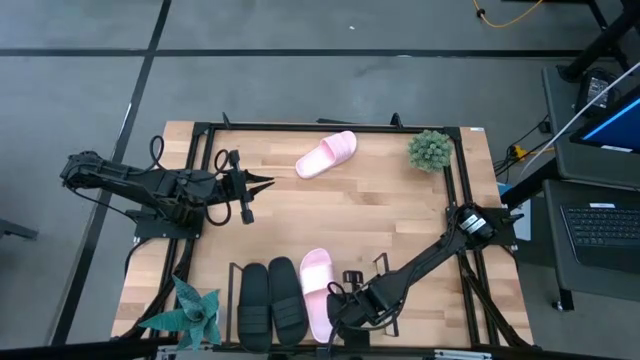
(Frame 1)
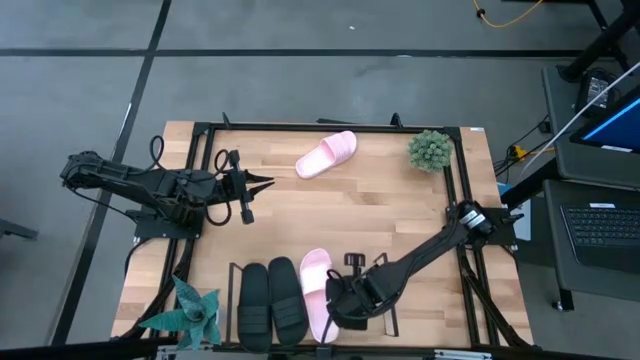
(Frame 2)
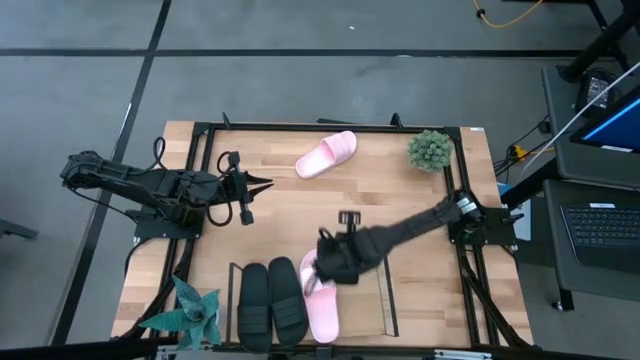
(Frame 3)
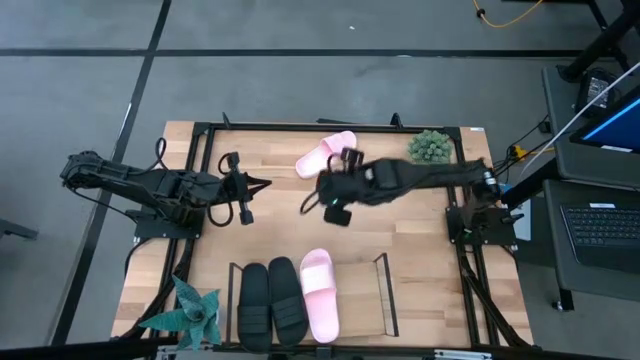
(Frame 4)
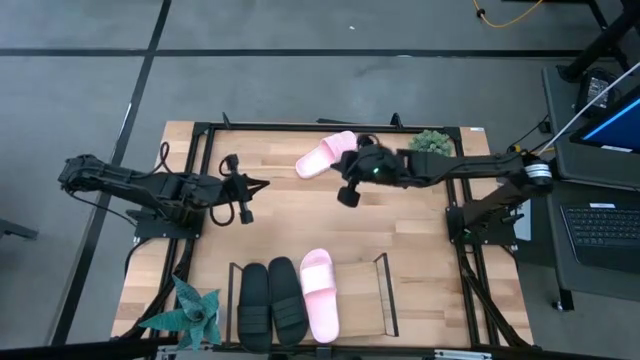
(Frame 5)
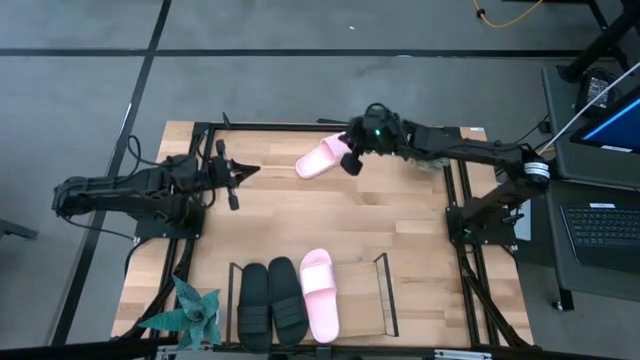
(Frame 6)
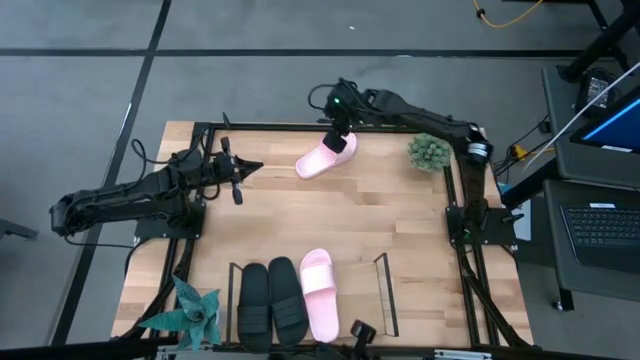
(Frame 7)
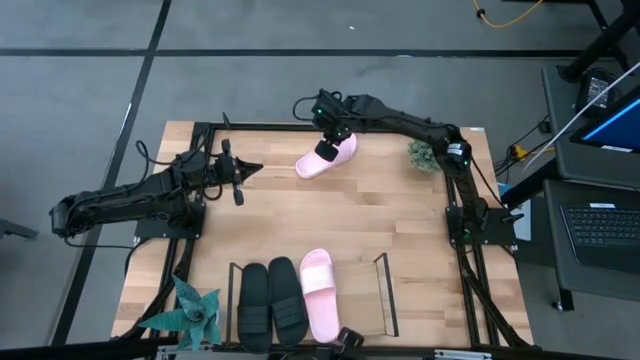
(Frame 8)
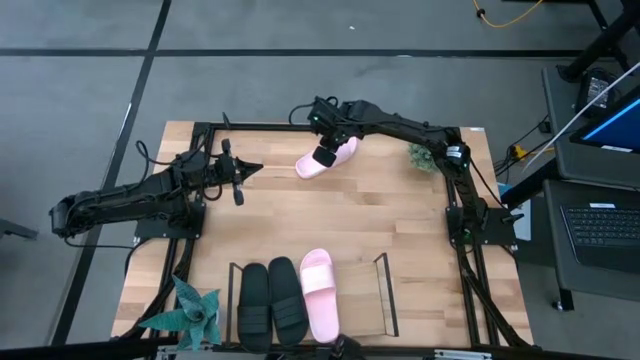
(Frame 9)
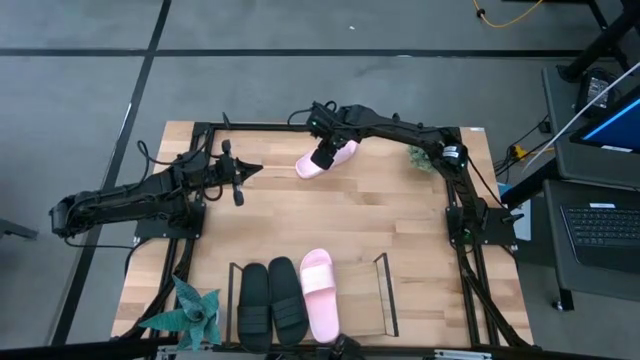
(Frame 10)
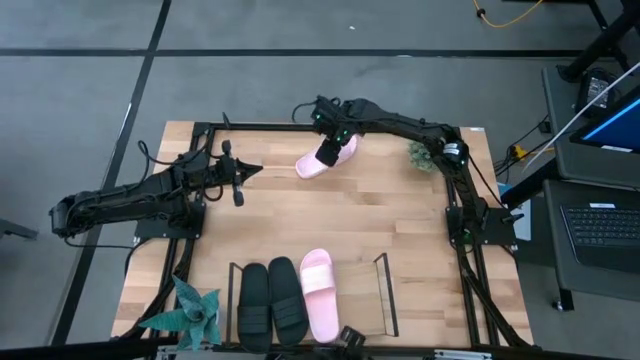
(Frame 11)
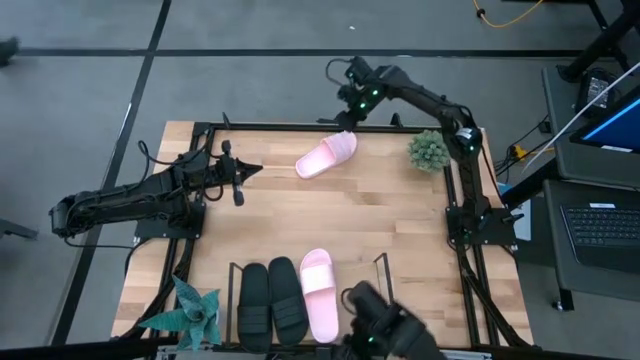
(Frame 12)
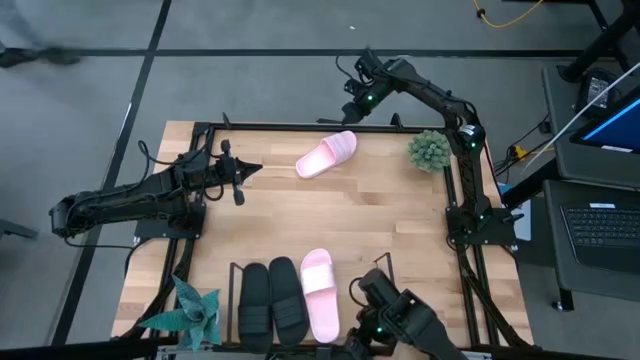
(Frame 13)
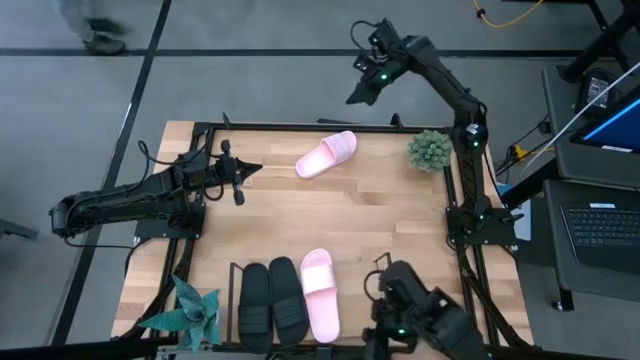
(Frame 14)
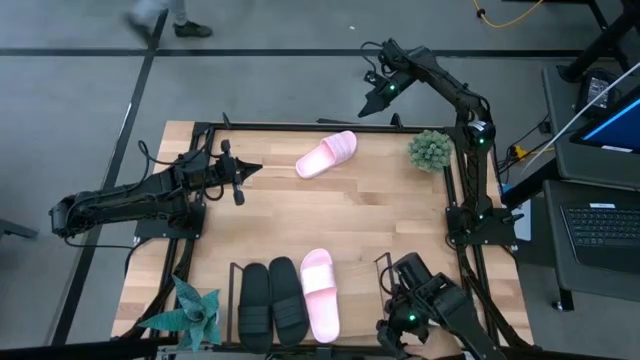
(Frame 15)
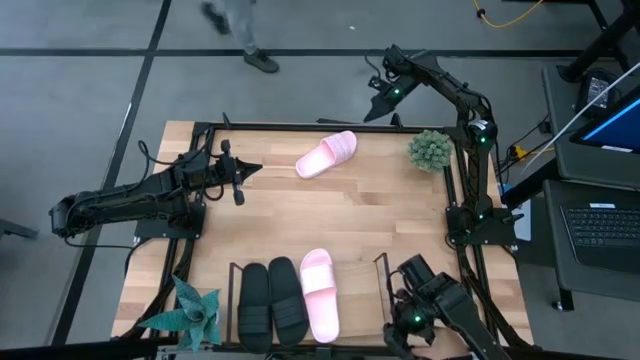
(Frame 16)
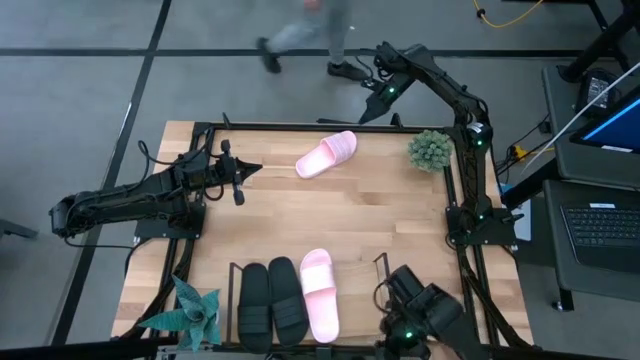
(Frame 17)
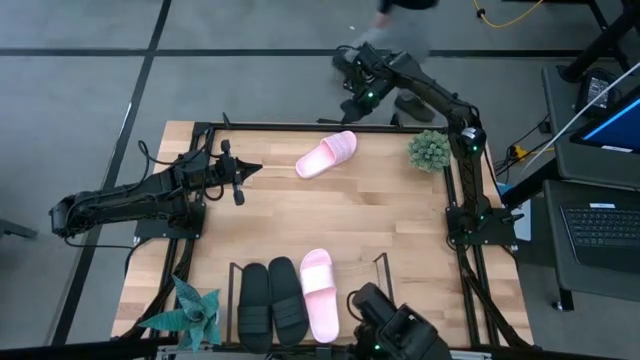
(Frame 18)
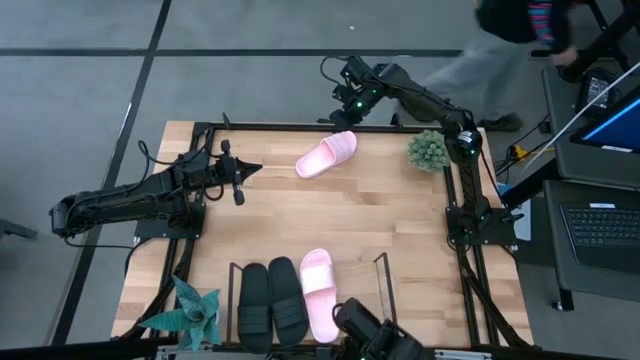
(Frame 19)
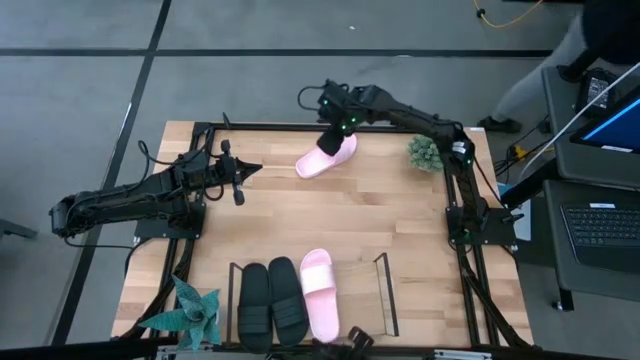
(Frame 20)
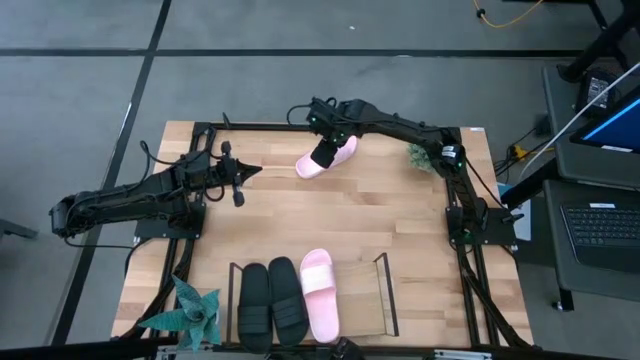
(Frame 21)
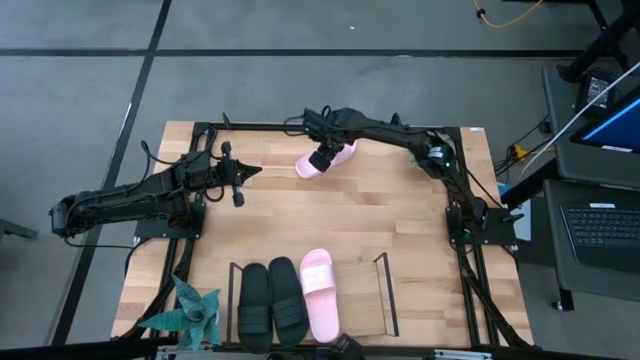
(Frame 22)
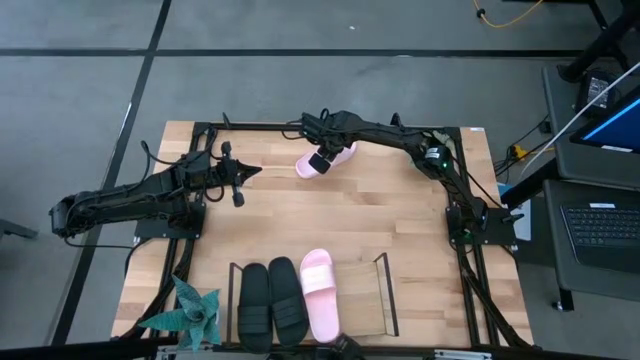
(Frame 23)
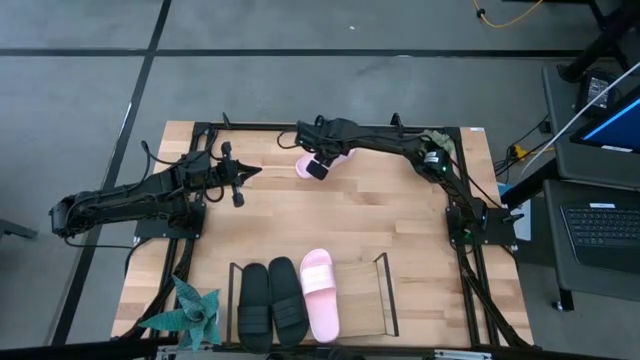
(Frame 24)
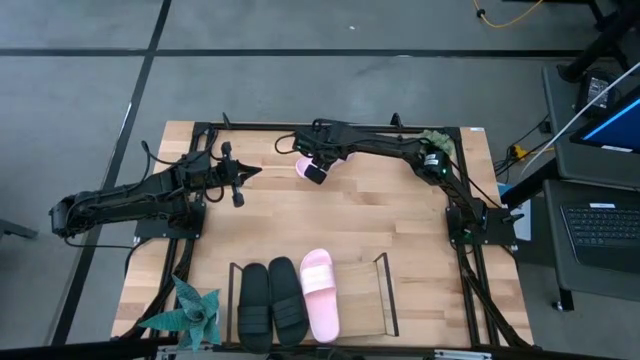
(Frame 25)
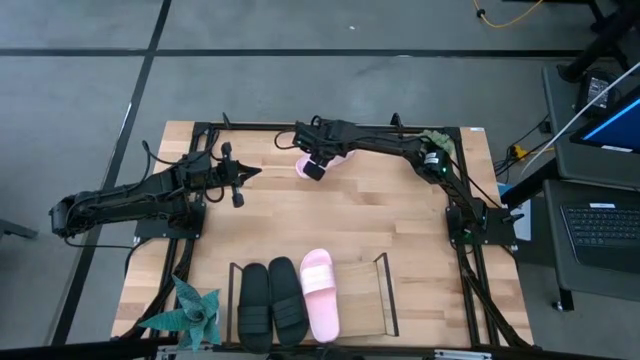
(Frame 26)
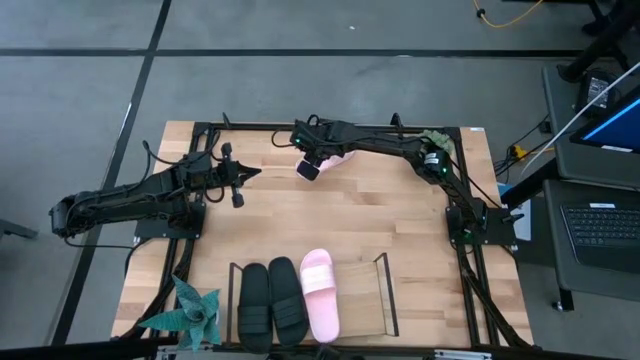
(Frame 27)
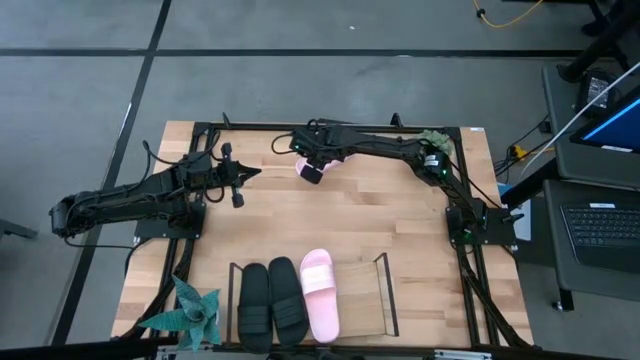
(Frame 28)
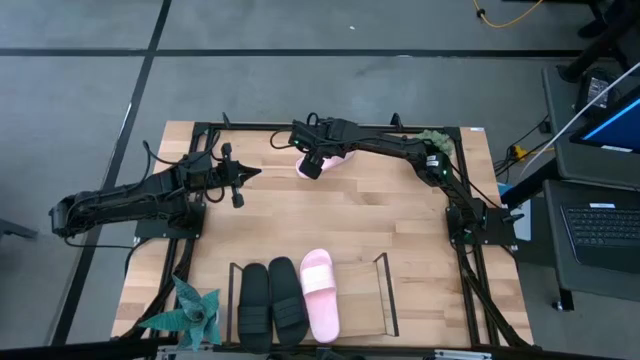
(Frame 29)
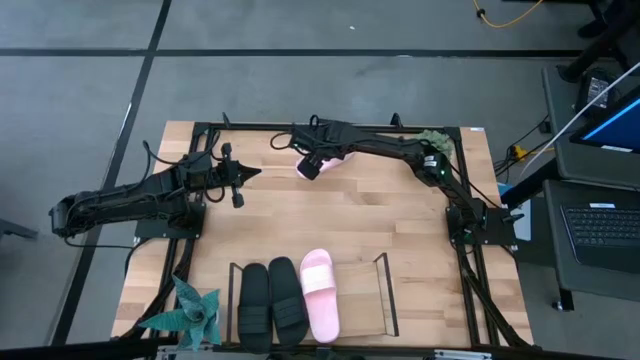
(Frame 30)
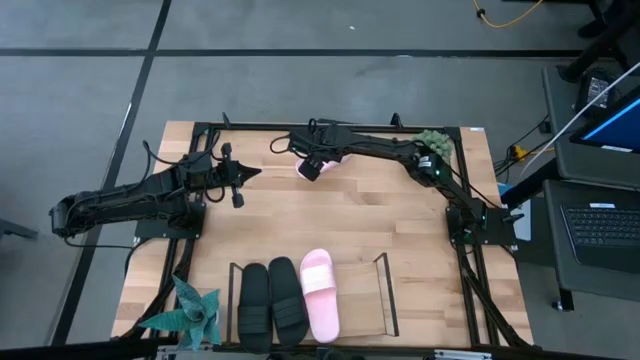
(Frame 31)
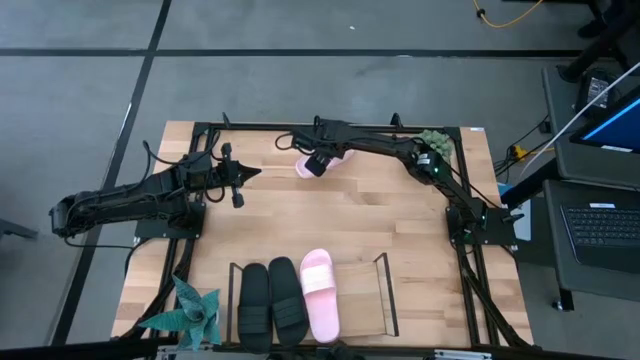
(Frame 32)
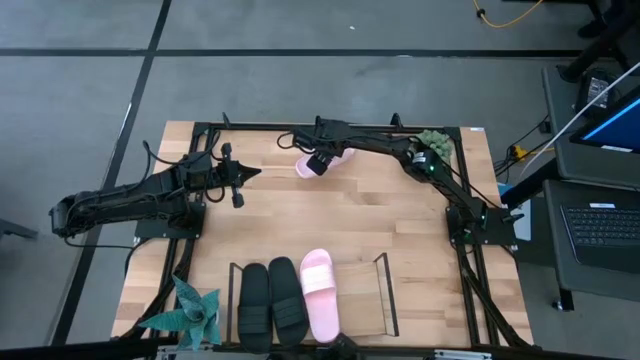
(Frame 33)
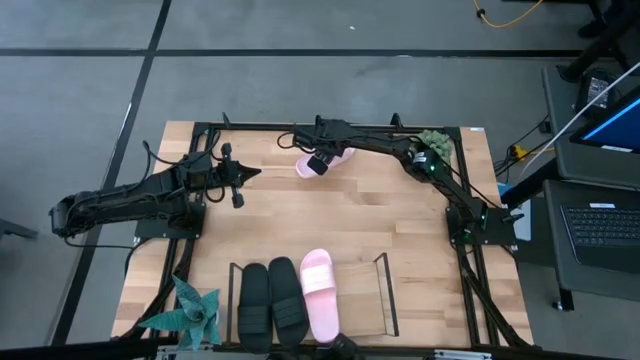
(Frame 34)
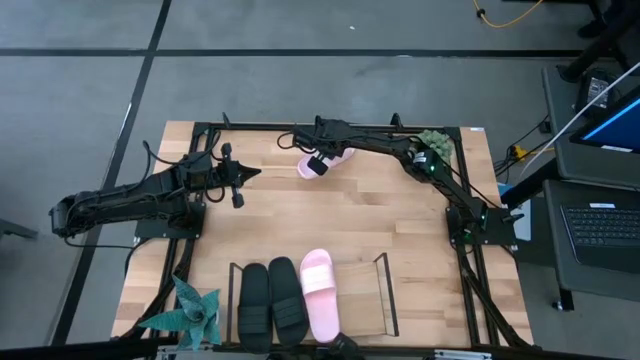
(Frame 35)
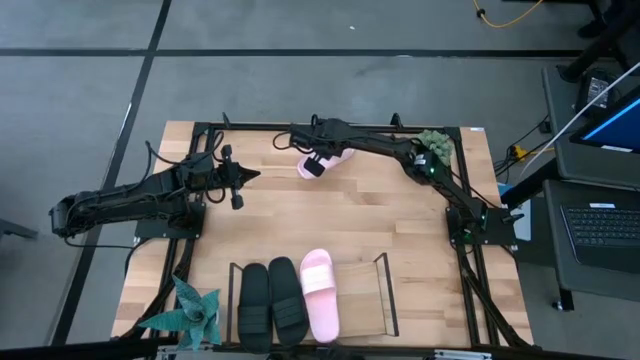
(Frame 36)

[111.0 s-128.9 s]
Task: Pick and place slides into the shelf
Put the pink slide on the shelf

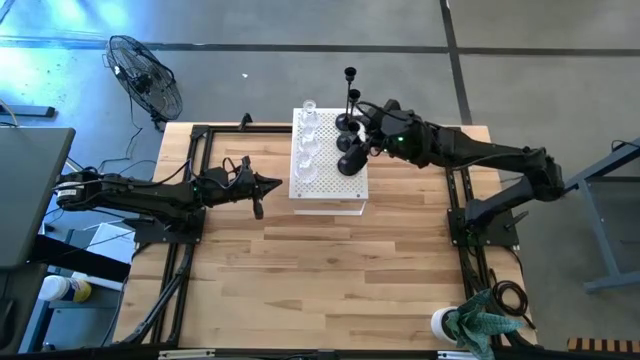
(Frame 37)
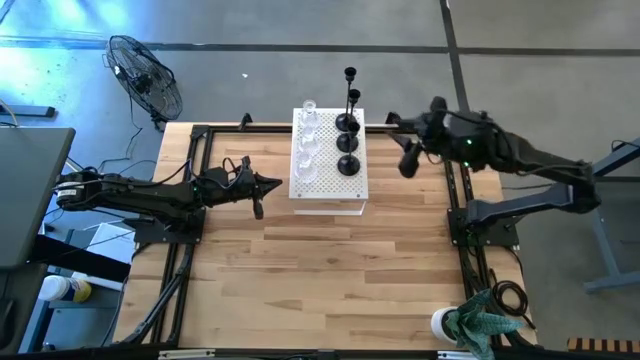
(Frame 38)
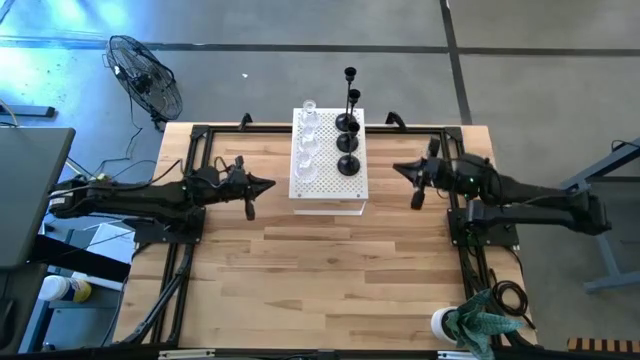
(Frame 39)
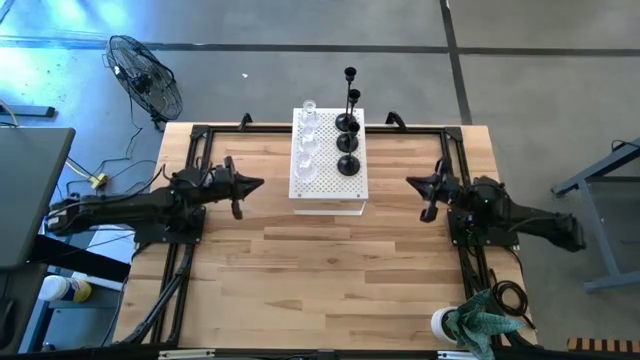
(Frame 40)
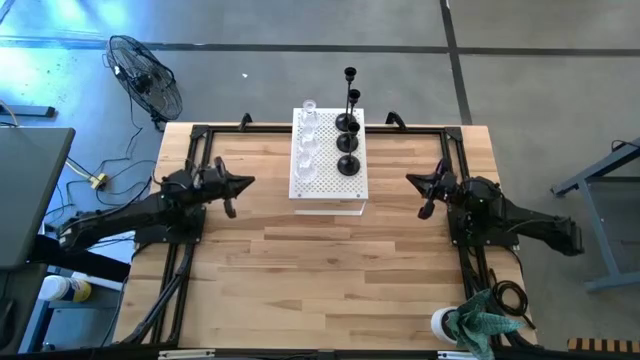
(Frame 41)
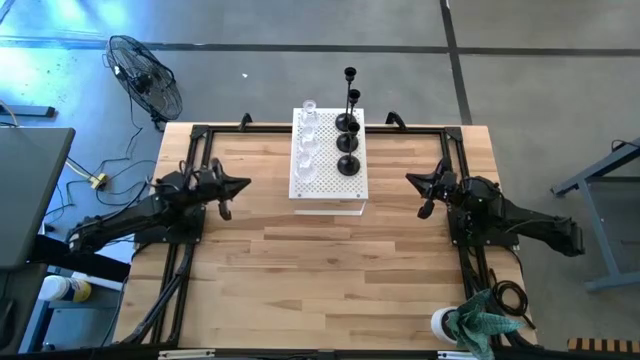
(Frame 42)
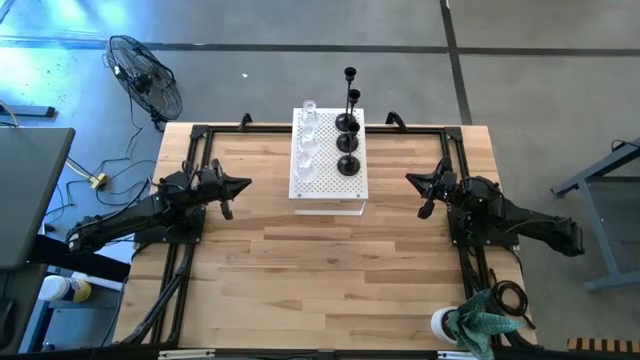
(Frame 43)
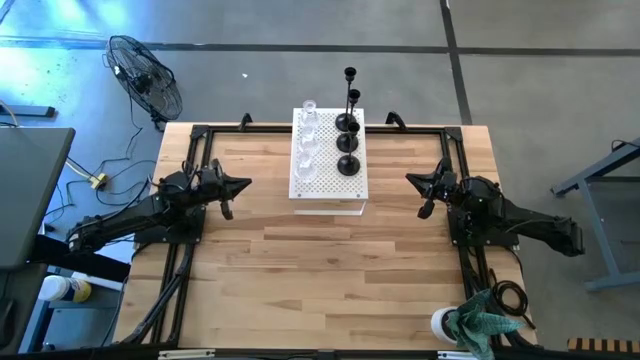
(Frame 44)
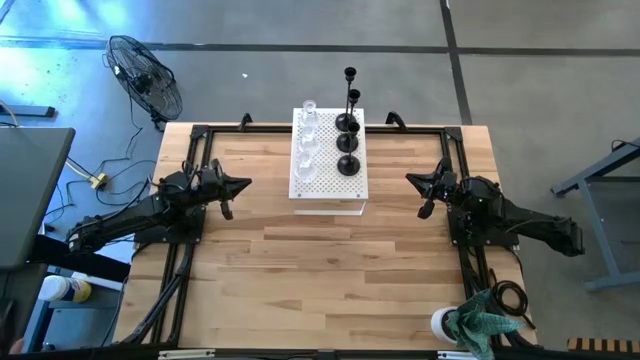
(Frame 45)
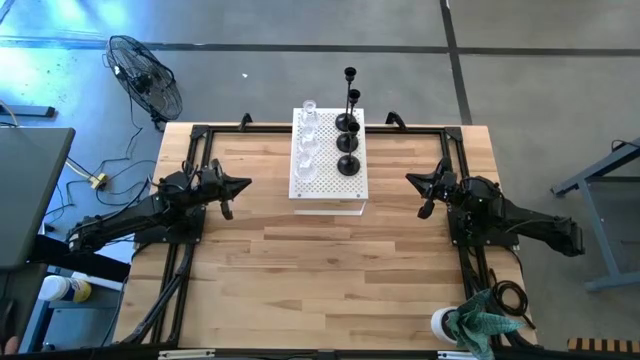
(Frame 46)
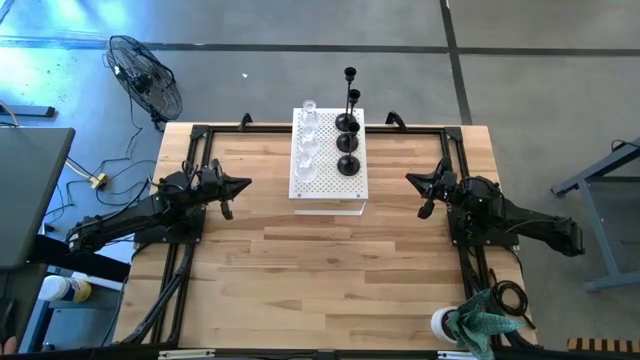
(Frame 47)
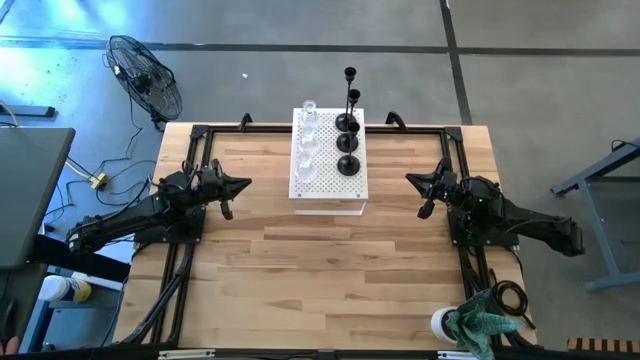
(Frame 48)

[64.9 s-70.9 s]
Task: Pick & Place candle stick holders
Return to Home Position
